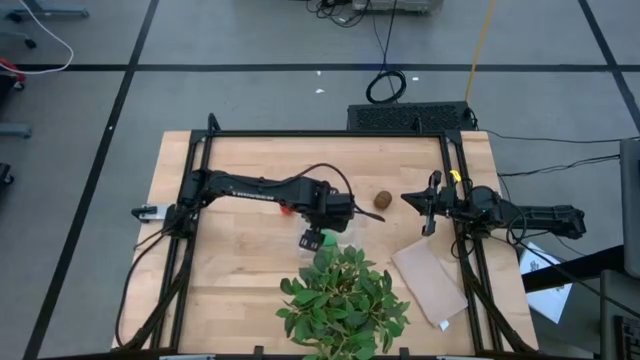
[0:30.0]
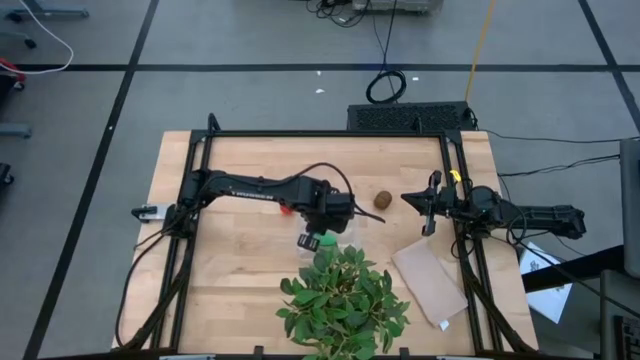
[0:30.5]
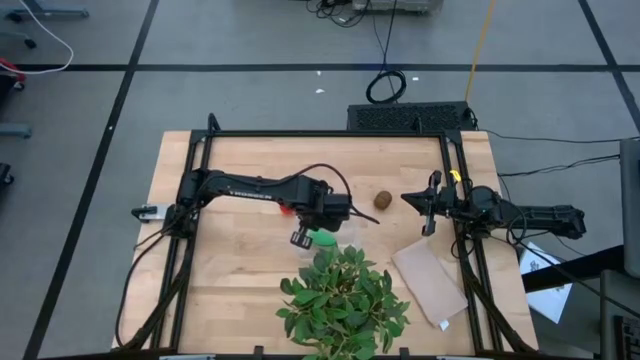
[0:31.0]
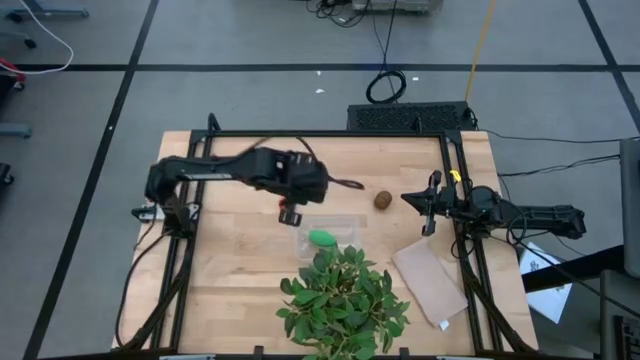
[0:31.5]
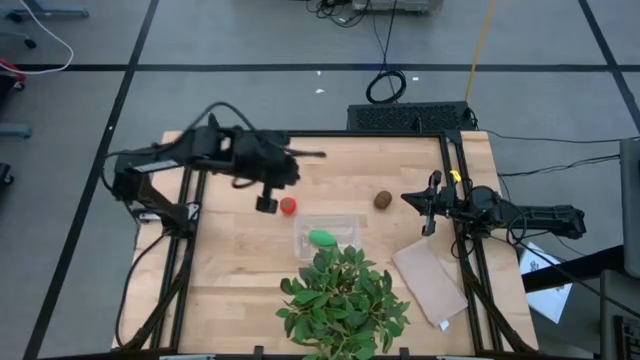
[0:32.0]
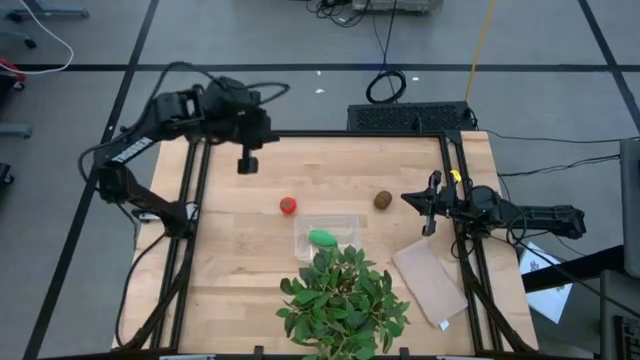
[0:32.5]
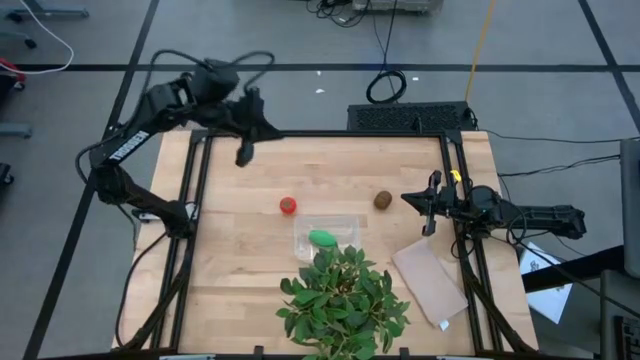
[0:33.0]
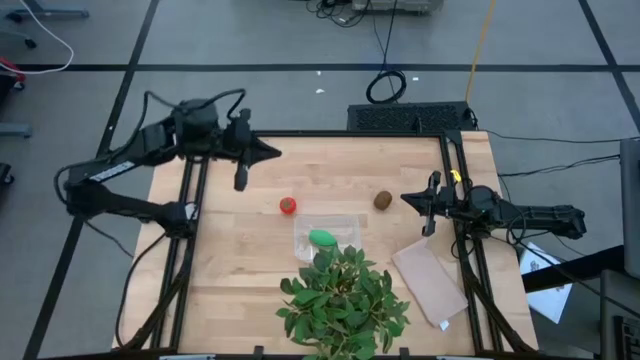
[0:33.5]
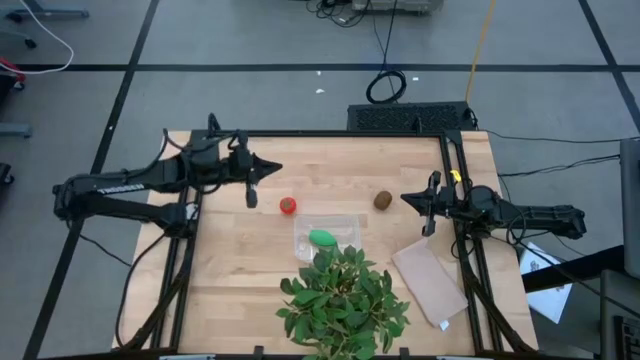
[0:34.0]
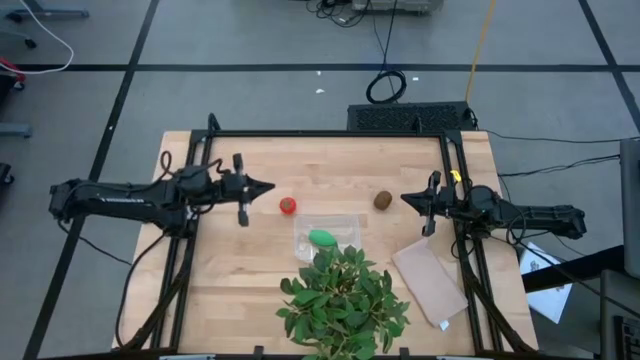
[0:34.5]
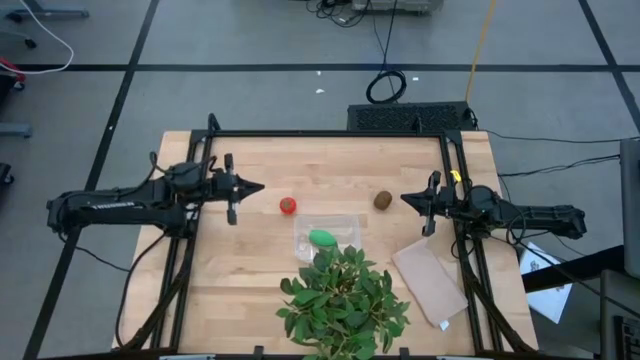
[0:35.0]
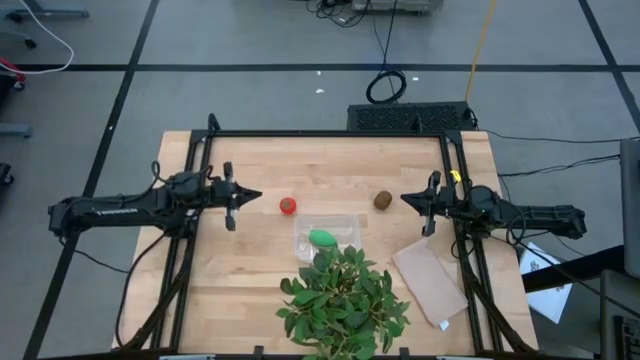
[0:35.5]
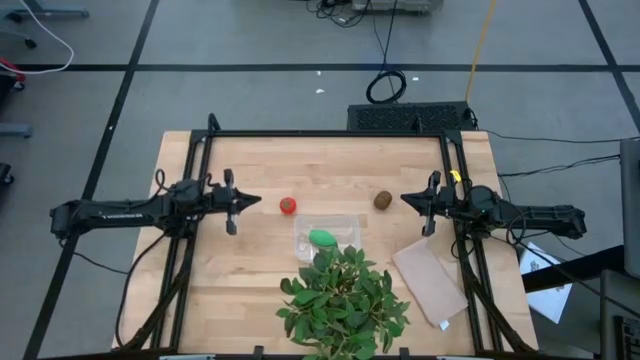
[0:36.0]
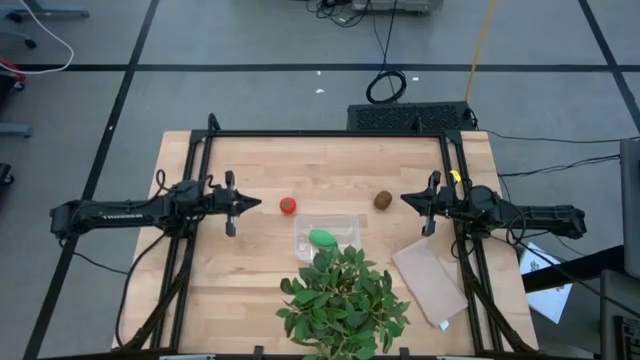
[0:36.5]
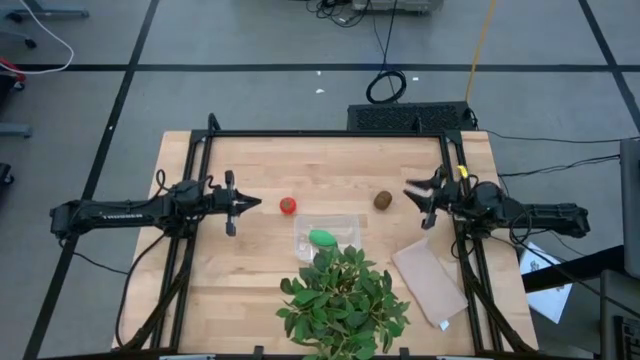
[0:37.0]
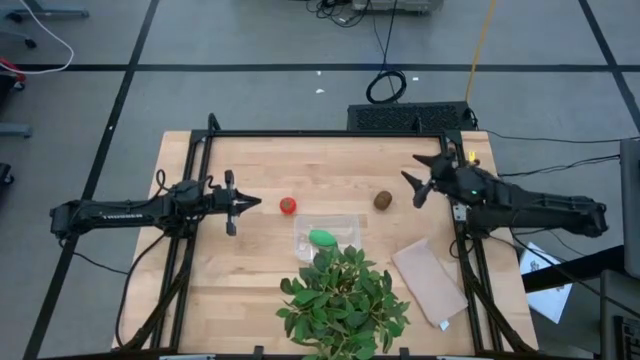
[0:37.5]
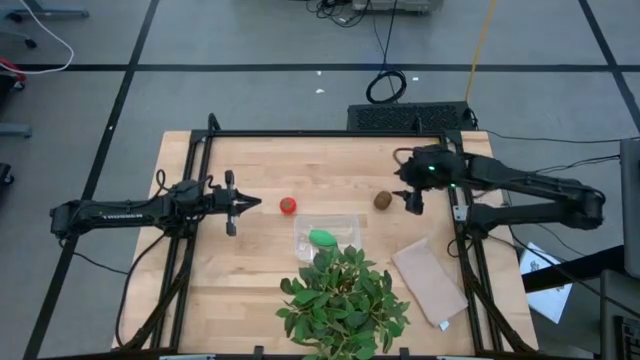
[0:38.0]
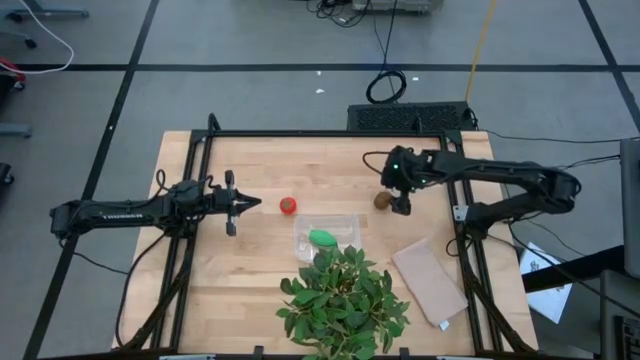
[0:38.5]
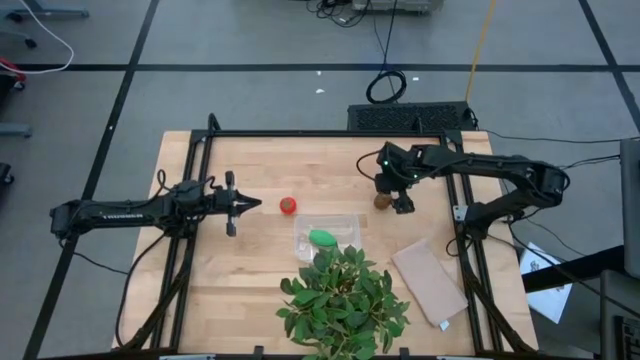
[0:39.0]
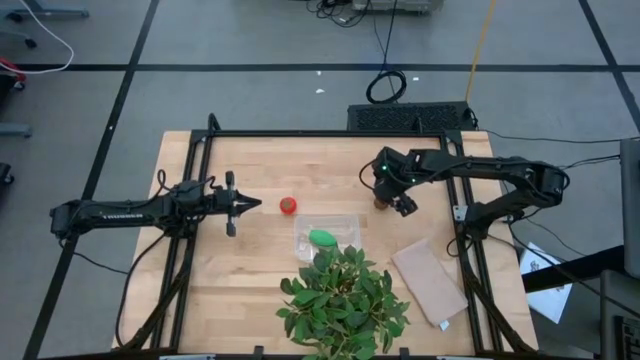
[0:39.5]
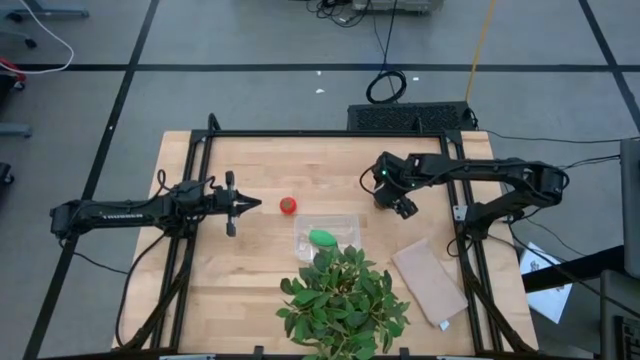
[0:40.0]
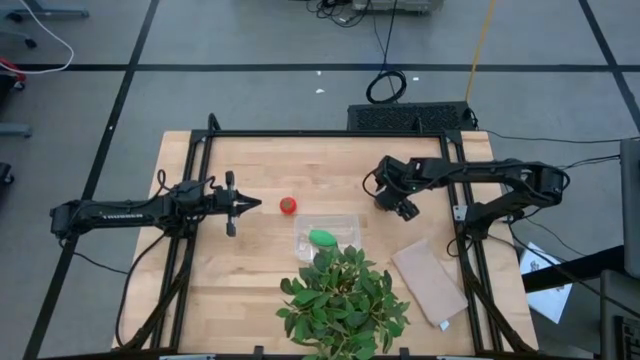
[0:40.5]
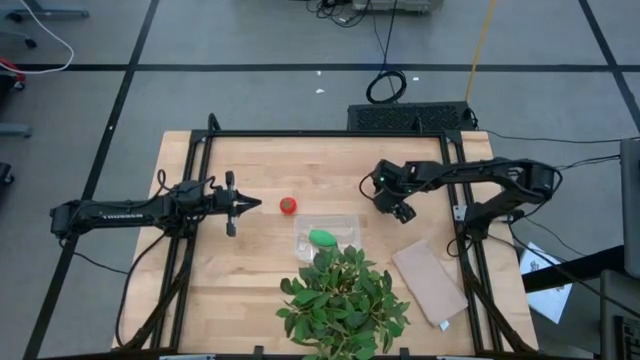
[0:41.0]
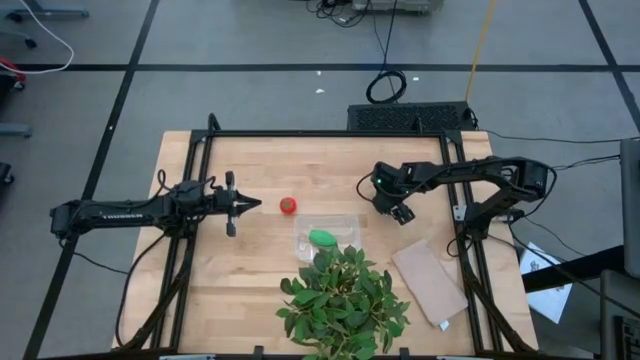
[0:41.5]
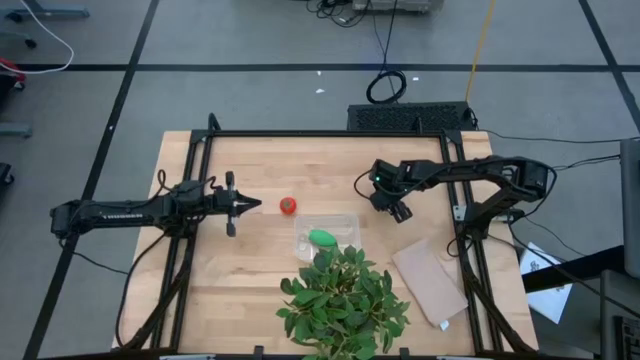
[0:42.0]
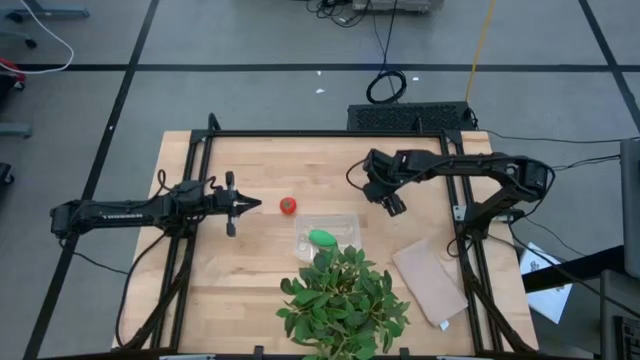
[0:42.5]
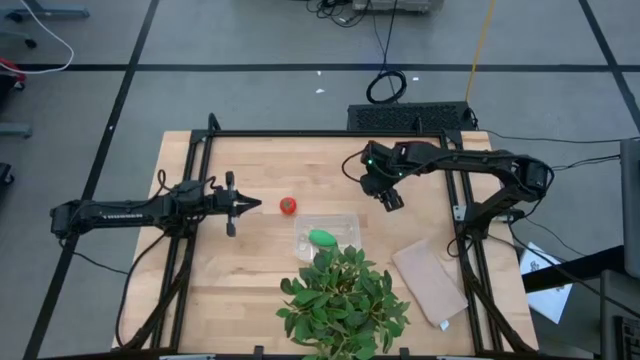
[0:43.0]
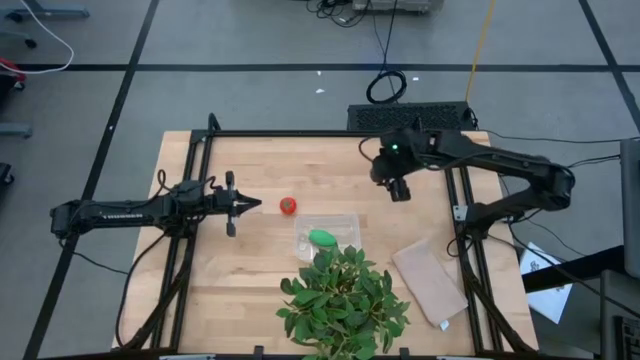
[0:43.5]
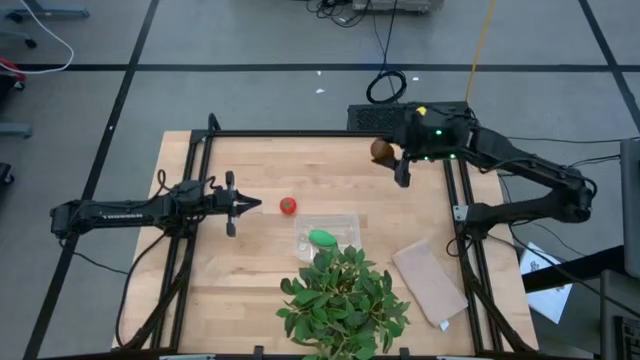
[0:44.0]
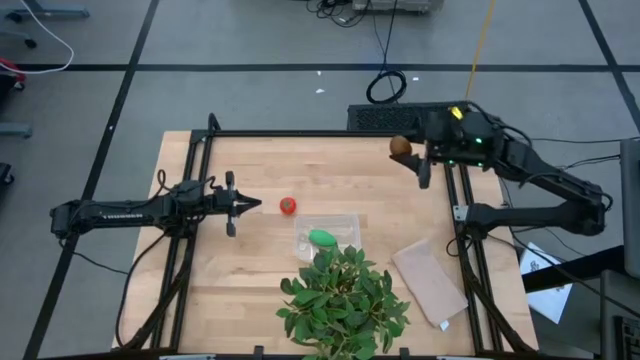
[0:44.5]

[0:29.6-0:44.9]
Task: Pick and placing Produce into tupperware
Put the brown kiwi into the transparent bin

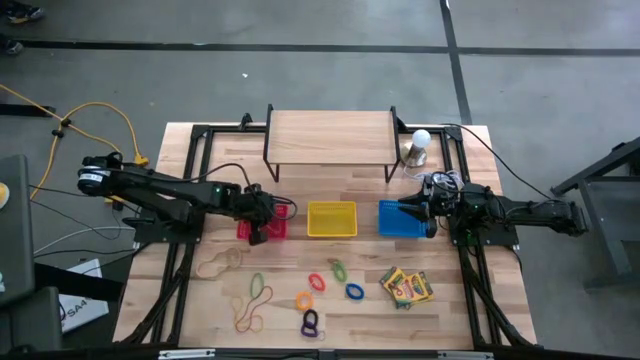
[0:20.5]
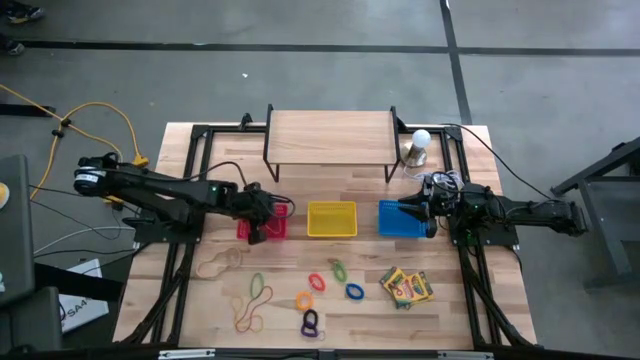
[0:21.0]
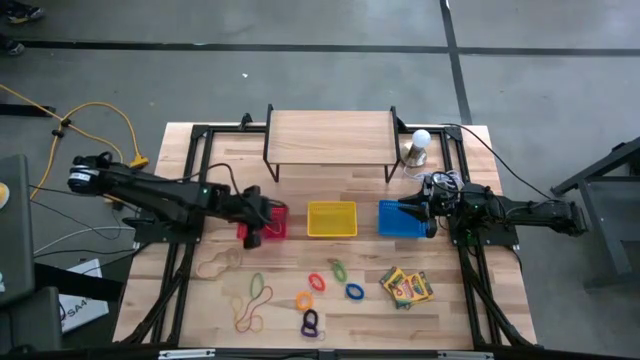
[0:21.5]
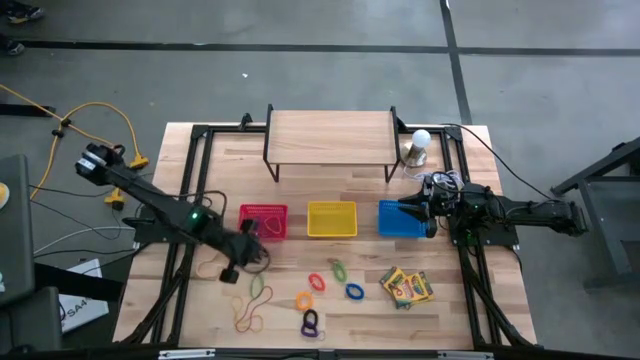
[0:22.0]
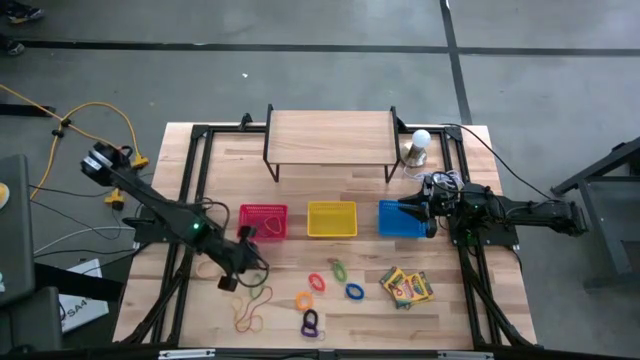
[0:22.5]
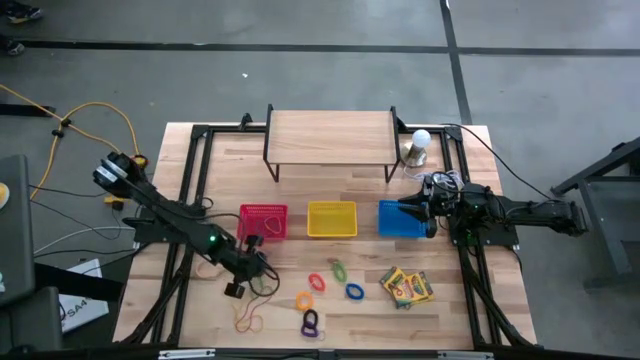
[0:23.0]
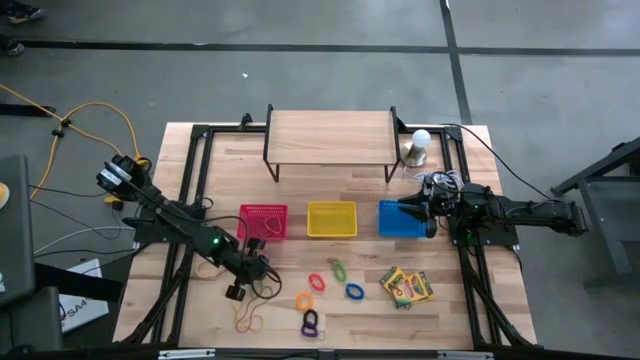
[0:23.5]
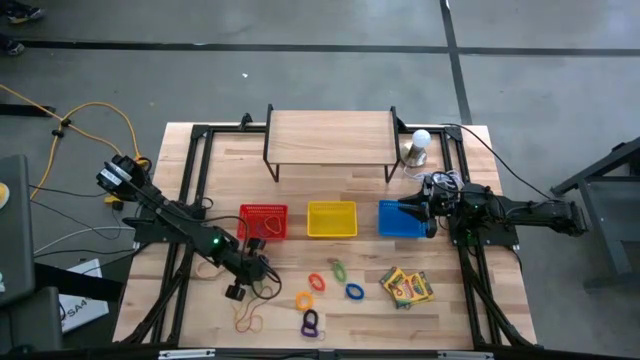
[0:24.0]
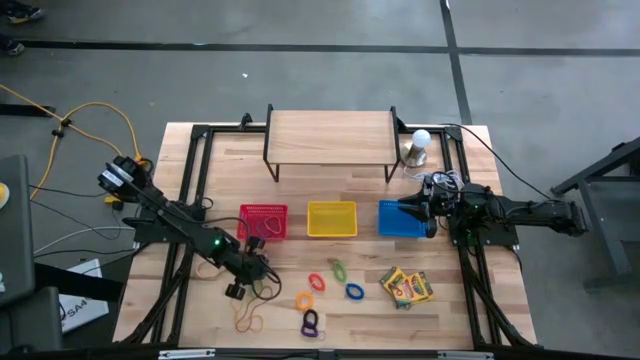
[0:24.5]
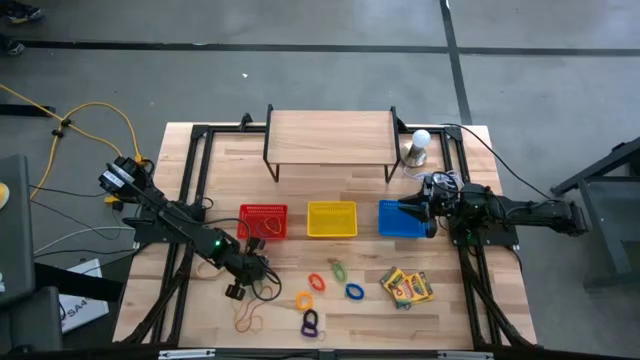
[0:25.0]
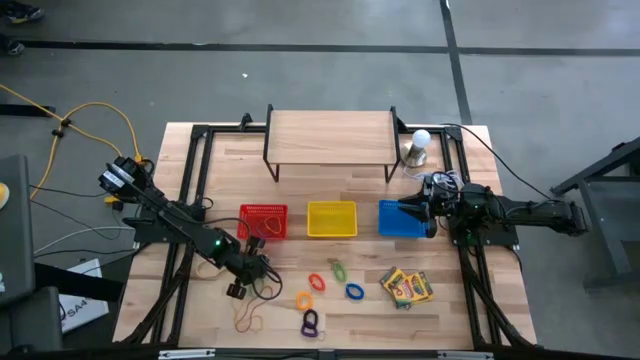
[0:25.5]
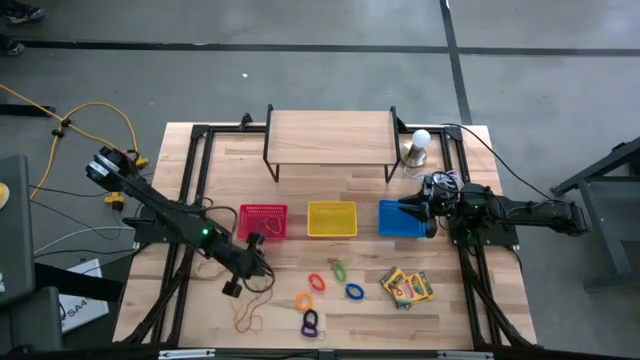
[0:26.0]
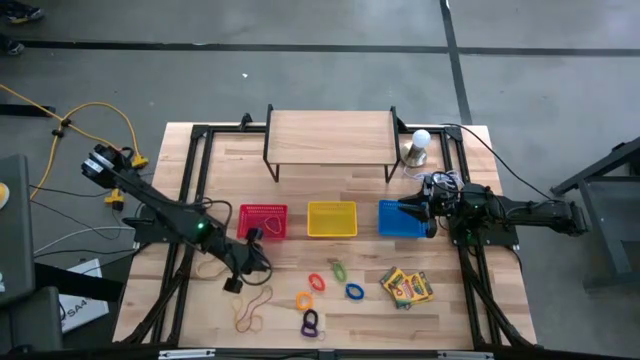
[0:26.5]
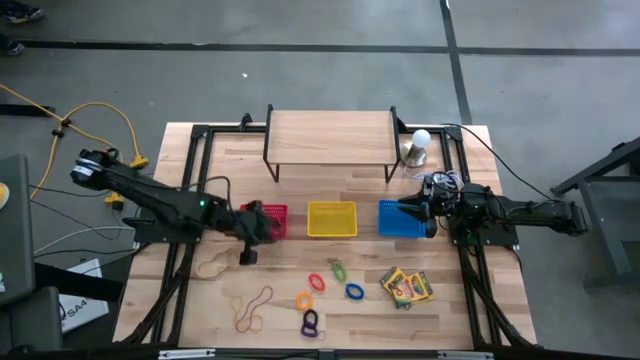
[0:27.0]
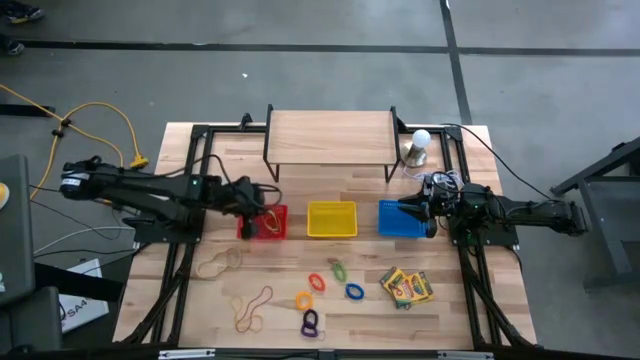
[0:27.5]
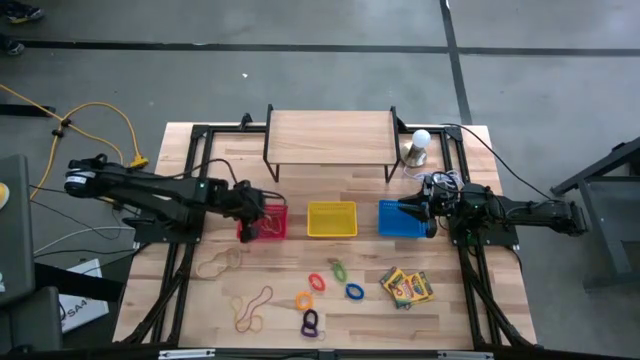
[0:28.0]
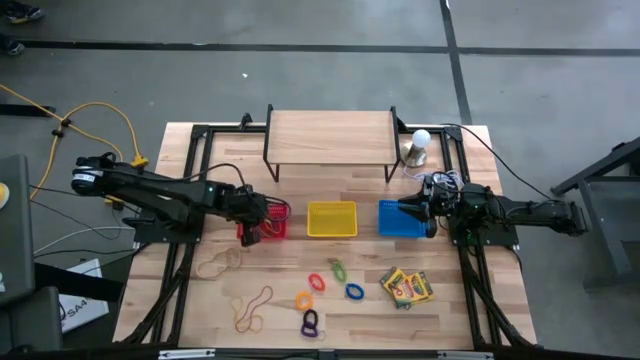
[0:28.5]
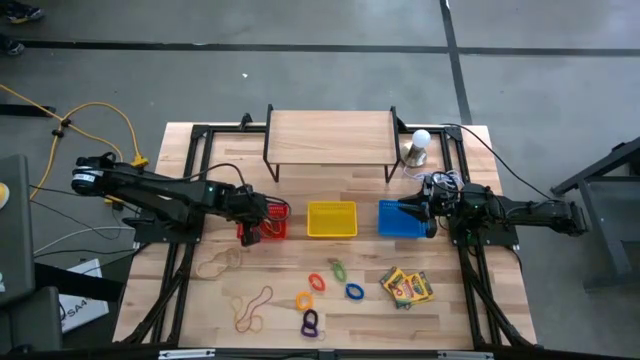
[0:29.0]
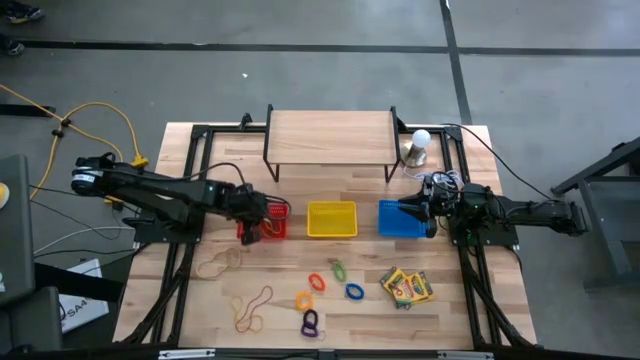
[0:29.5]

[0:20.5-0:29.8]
Task: Pick & Place Office Desk Supplies
Put the green rubber band into the red bin
